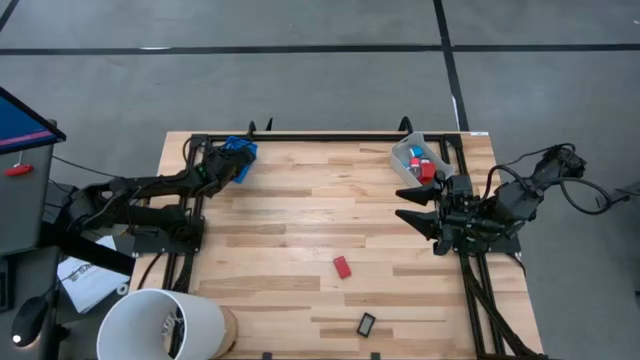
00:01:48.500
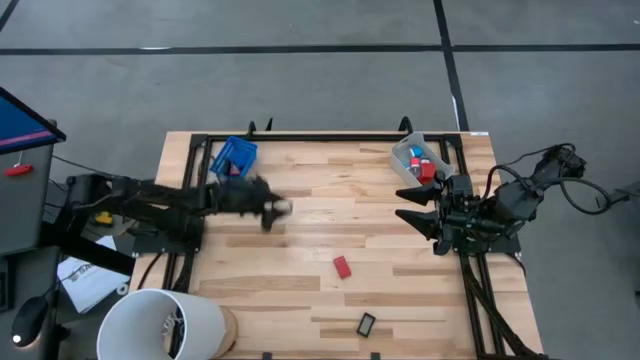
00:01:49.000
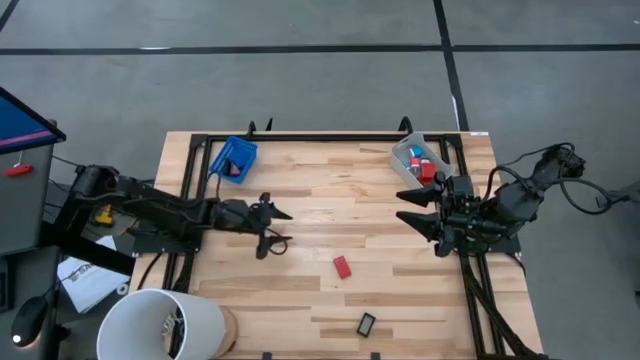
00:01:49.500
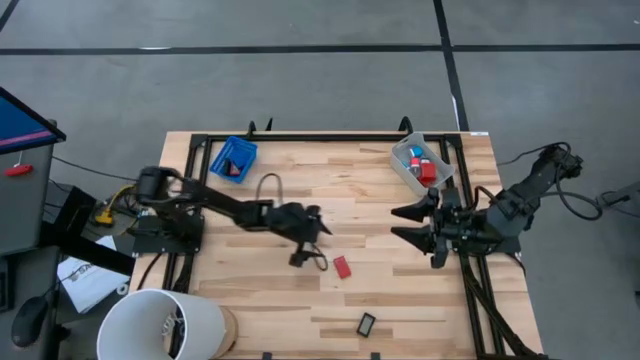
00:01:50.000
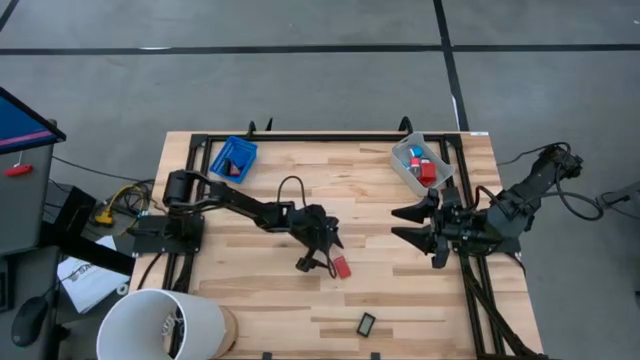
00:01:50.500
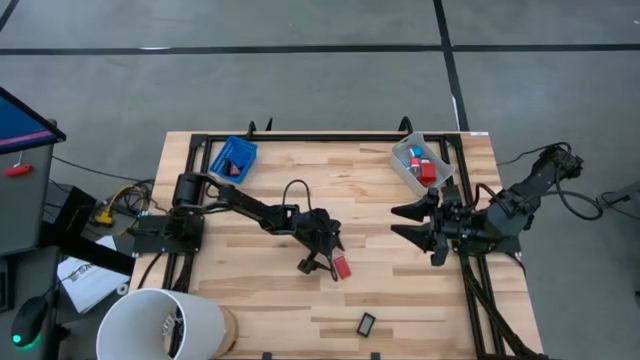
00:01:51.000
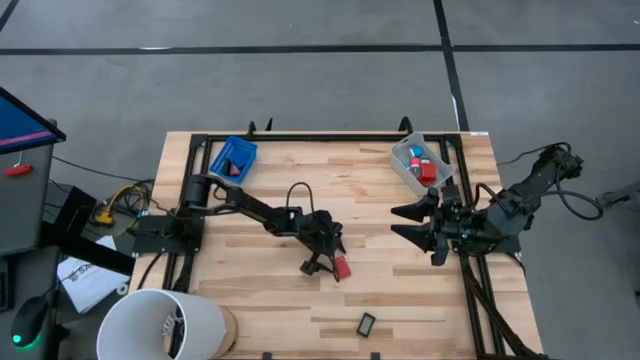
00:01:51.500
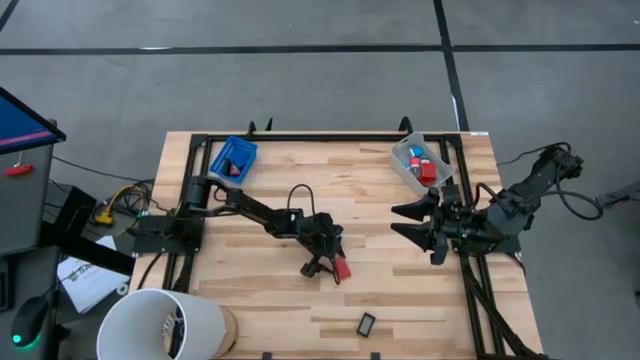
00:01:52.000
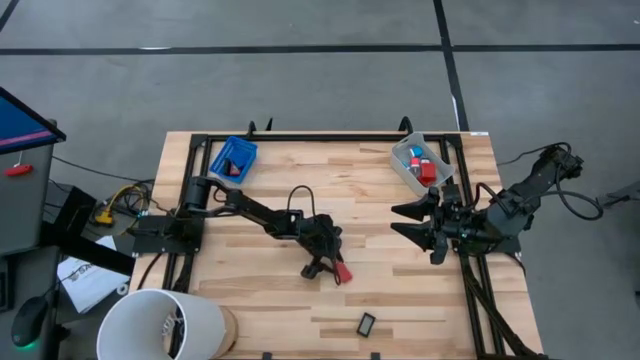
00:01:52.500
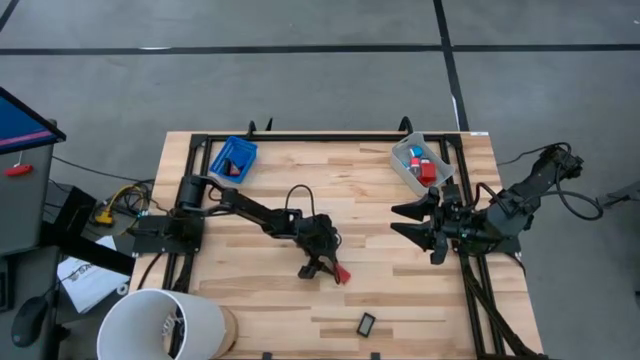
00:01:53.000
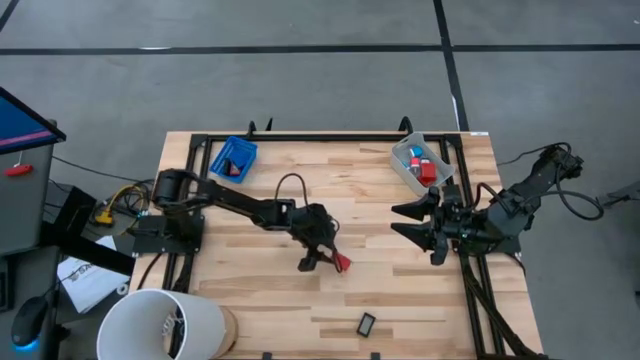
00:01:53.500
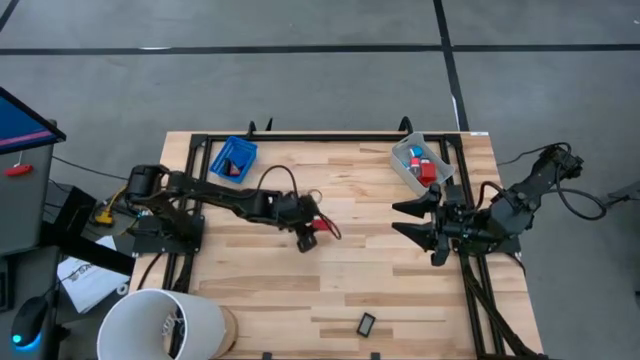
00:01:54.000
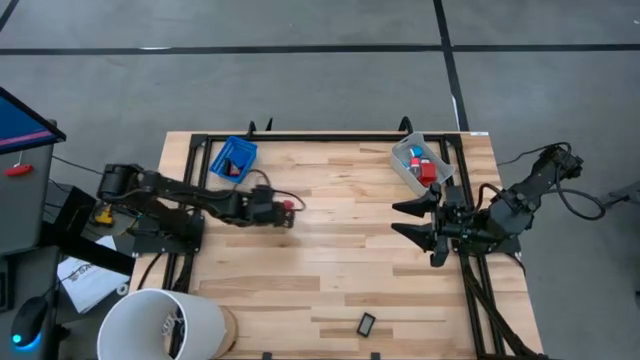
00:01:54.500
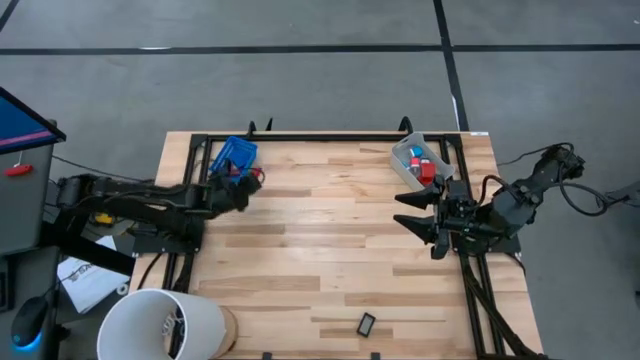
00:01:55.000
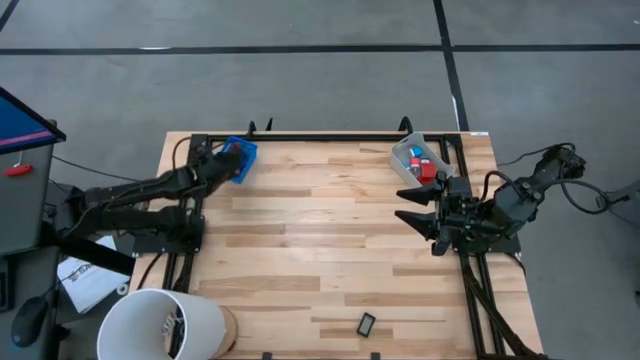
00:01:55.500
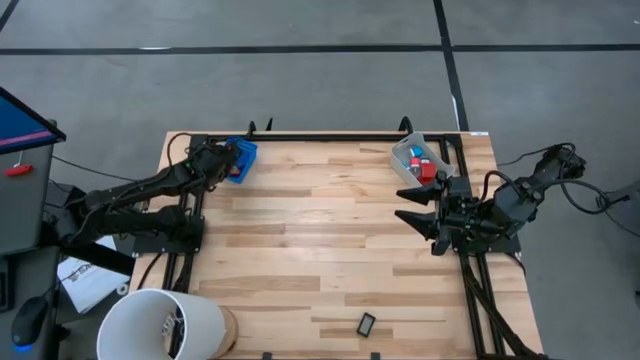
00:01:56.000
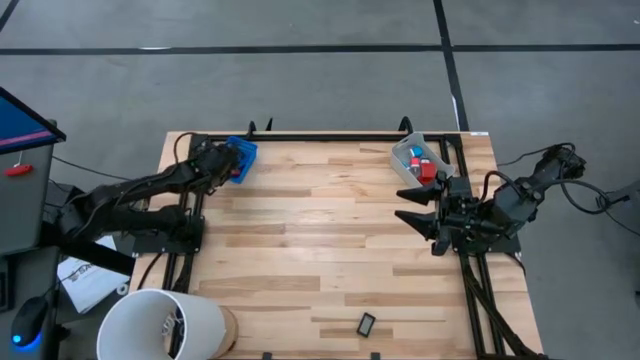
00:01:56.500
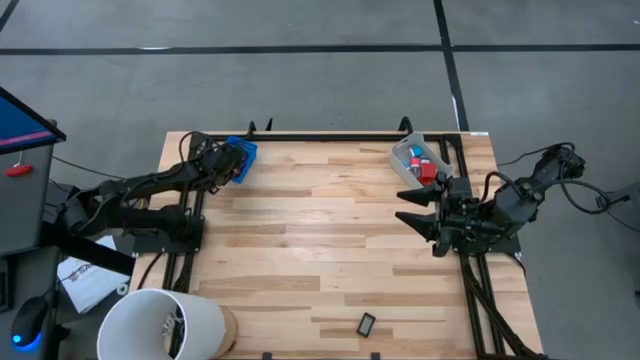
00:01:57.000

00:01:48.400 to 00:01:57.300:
Task: Pick & Place Office items
Put the red clock into the blue bin

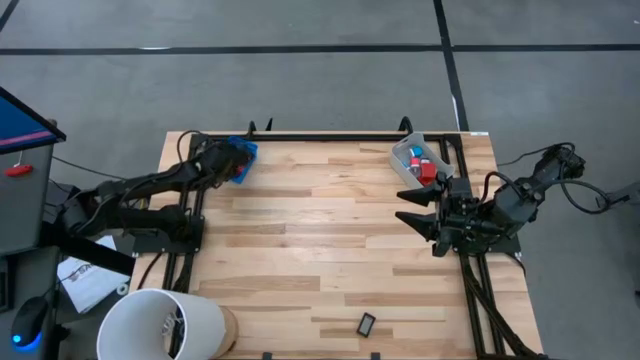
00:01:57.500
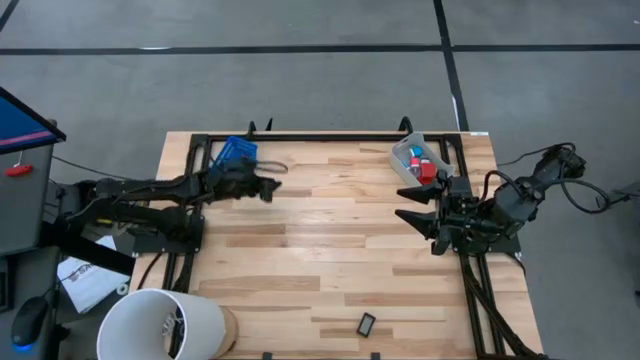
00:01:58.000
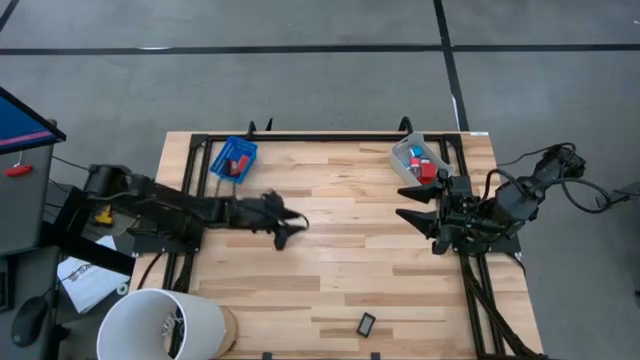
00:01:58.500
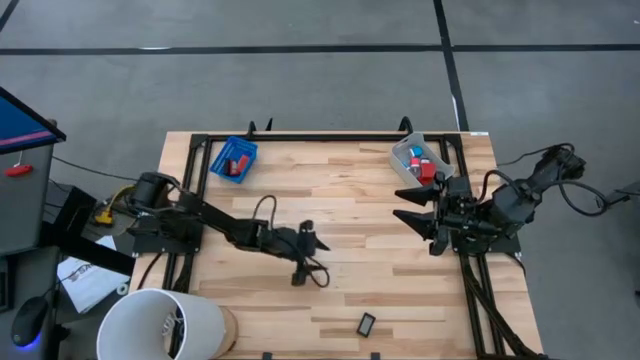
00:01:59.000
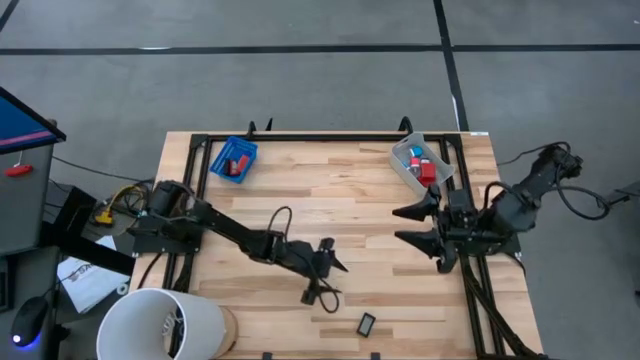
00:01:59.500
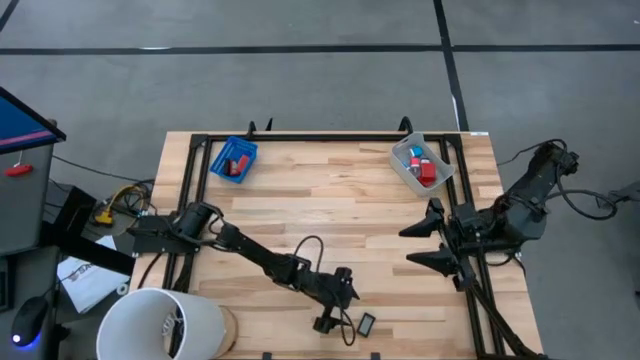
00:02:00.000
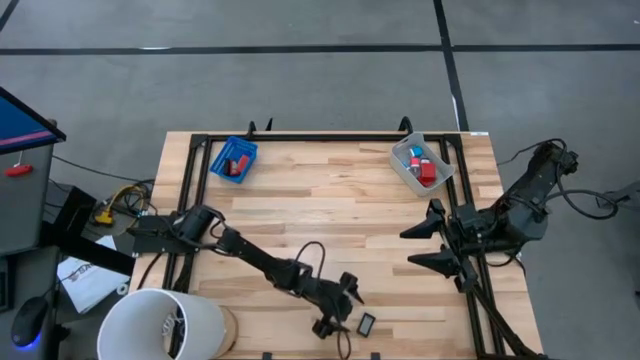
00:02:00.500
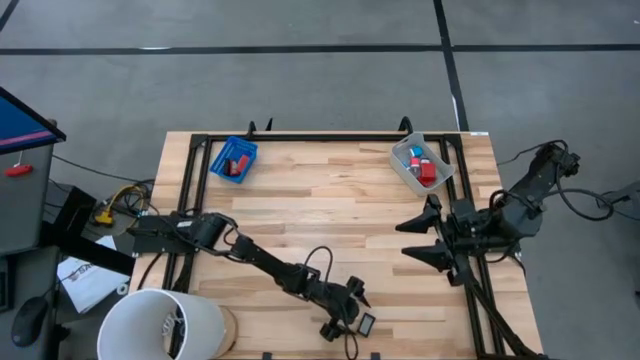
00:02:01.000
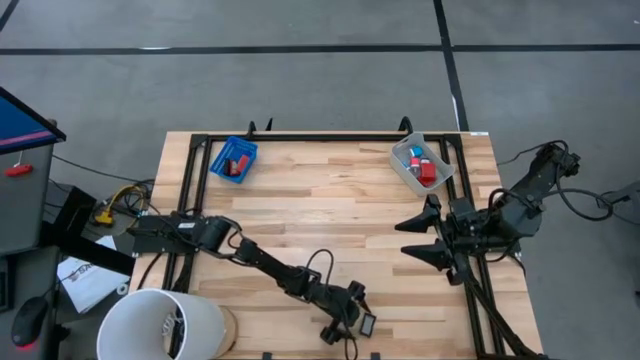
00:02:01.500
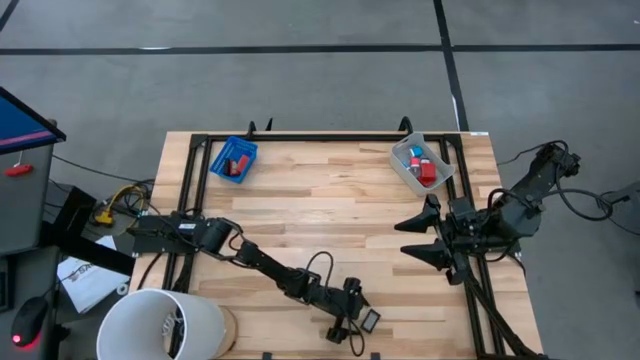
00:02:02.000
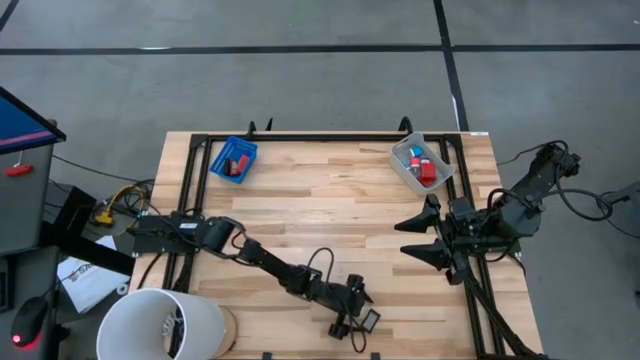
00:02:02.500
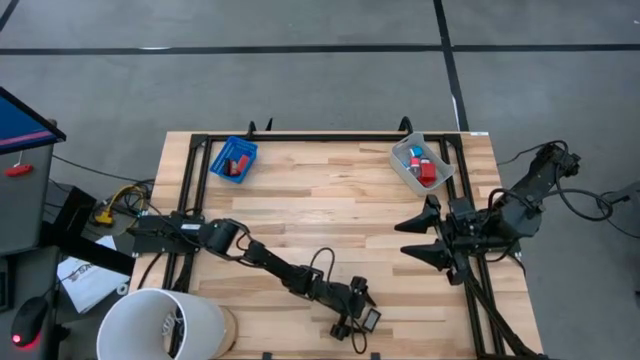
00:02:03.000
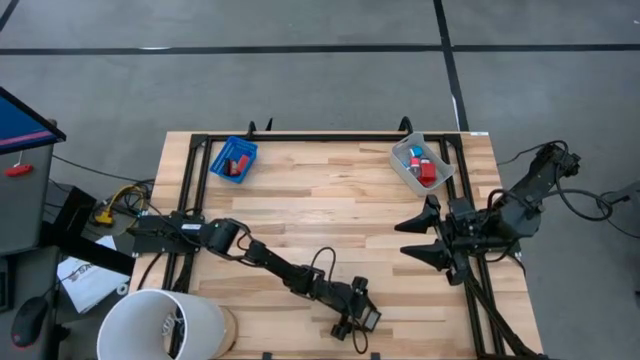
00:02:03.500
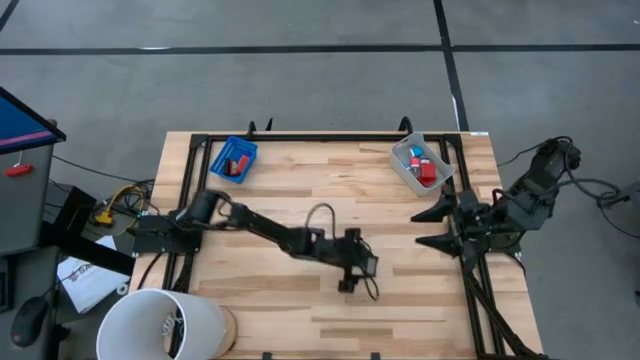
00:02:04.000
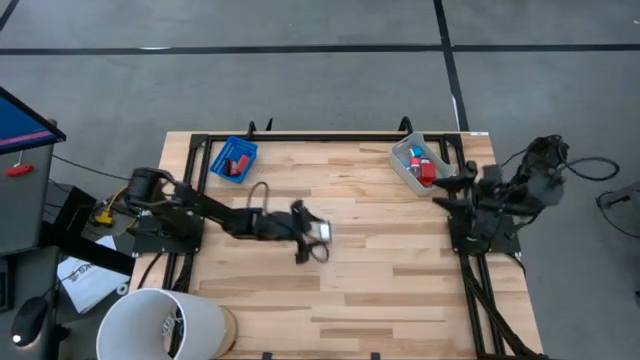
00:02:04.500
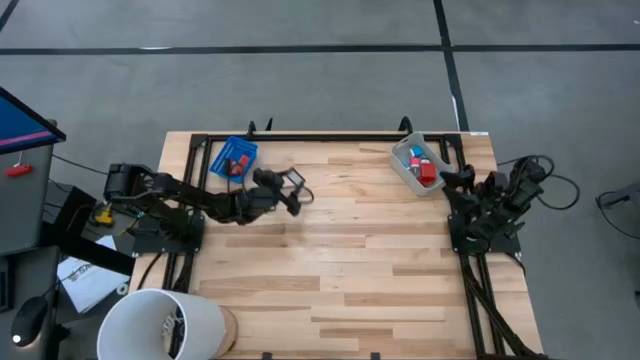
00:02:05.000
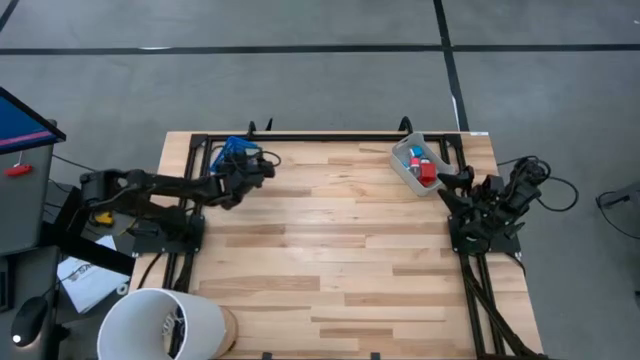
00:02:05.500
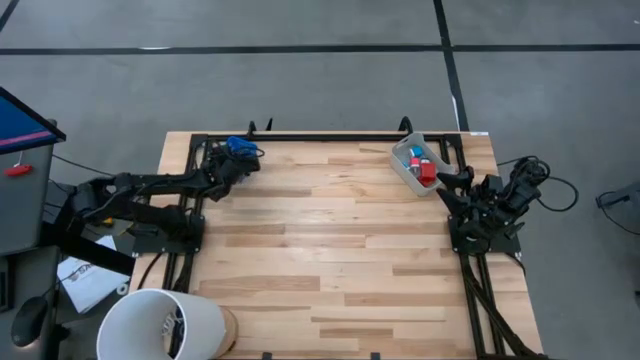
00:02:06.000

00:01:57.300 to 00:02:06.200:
Put the black clock into the blue bin

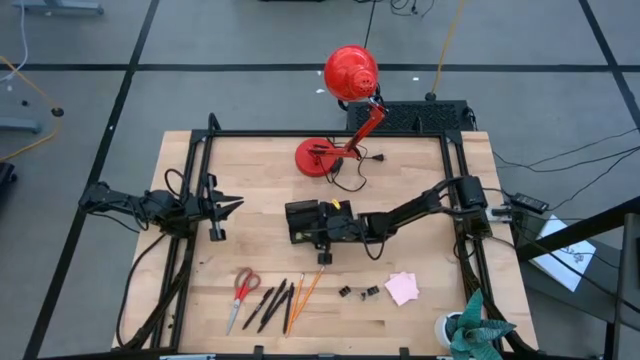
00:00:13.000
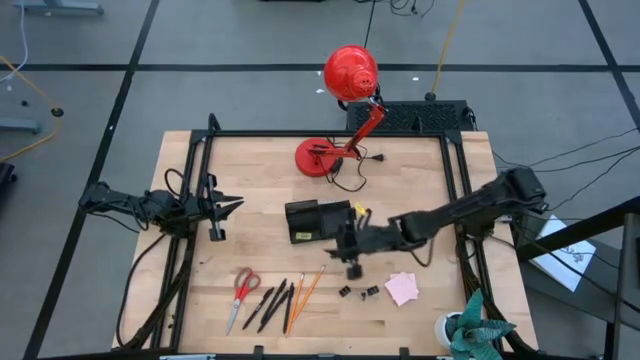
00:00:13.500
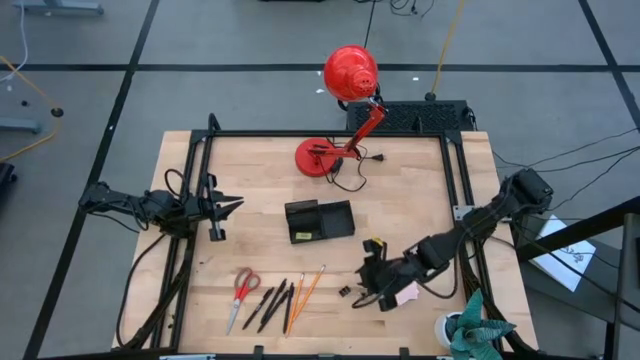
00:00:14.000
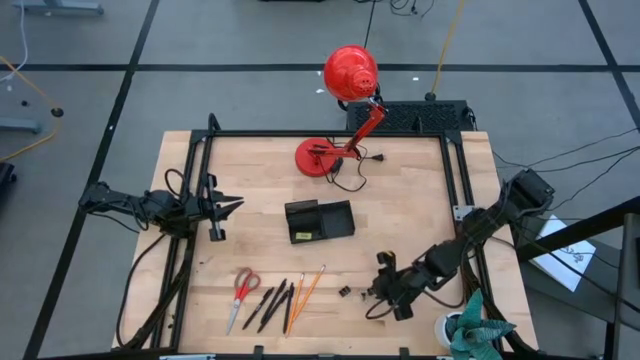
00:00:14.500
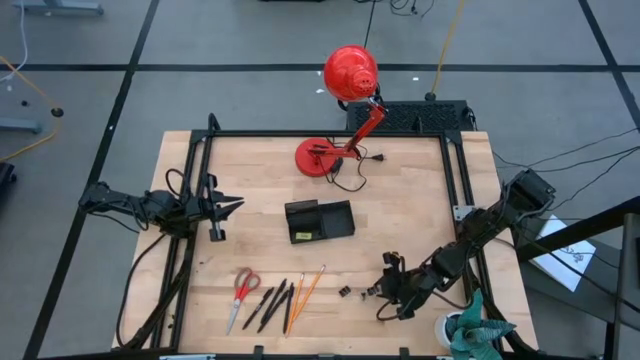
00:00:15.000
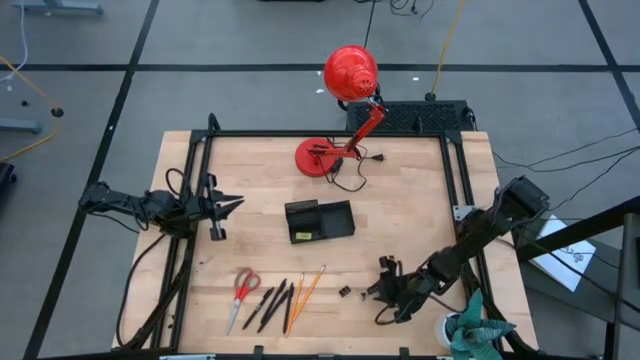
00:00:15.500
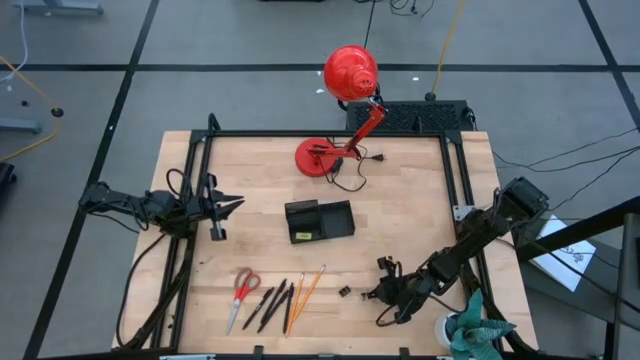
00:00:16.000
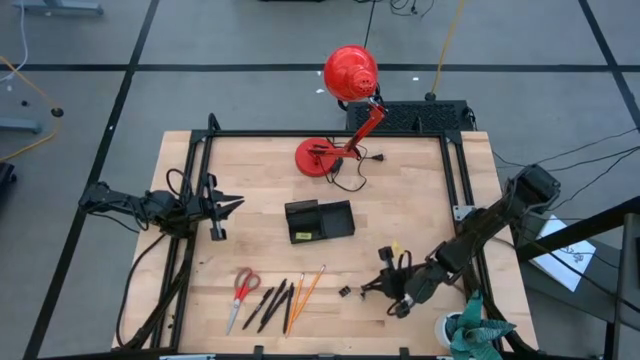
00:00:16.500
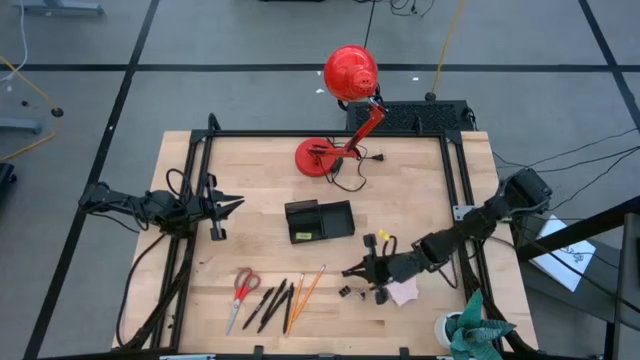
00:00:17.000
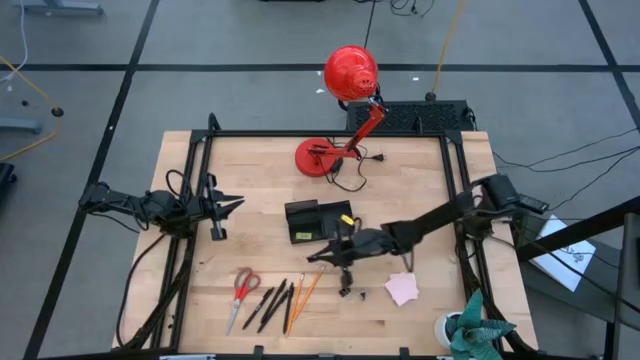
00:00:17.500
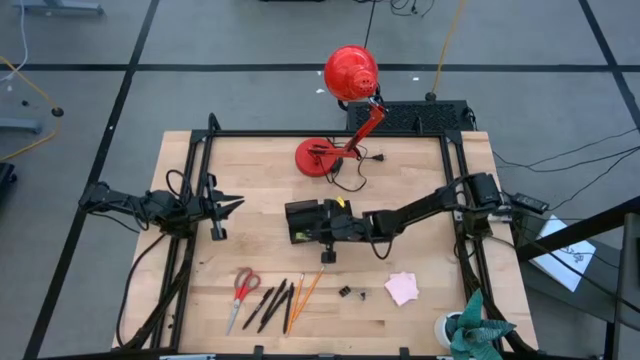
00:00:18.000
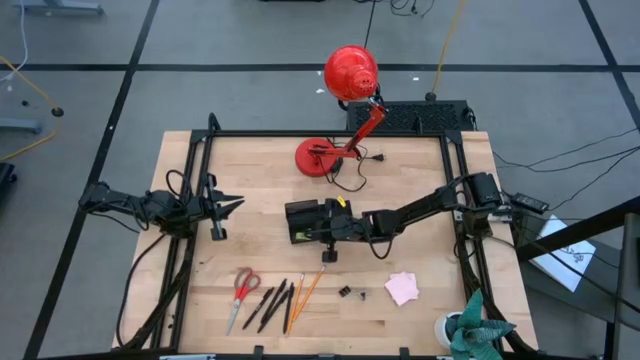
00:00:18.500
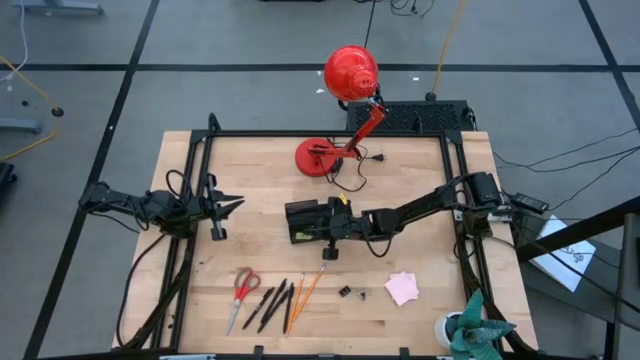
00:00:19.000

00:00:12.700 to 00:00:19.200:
Task: Pick and place office supplies into organizer
Put the right black binder clip into the desk organizer
